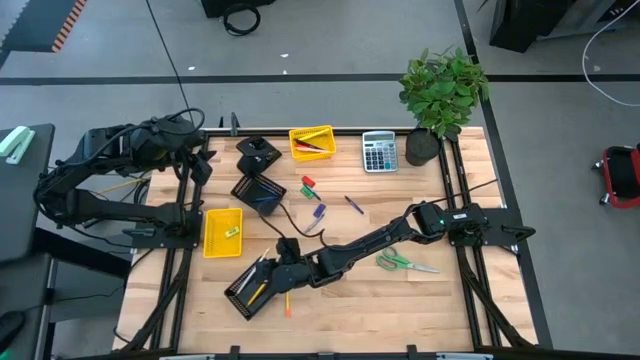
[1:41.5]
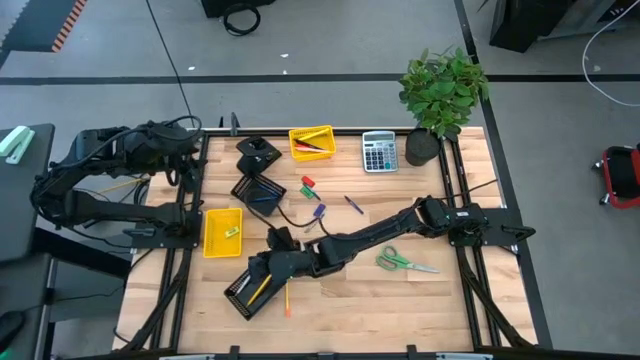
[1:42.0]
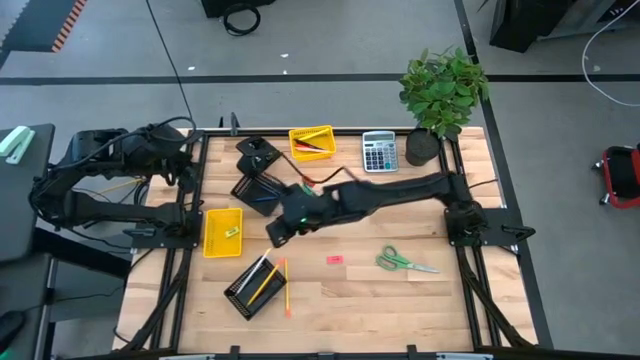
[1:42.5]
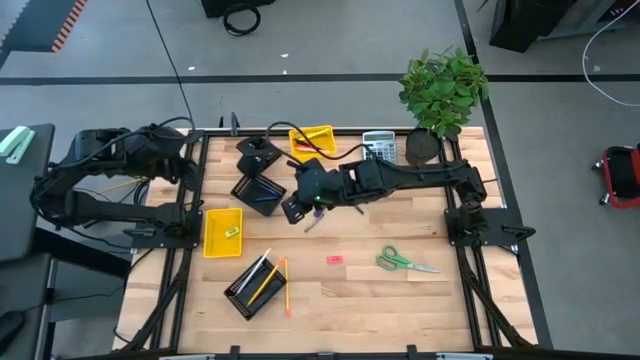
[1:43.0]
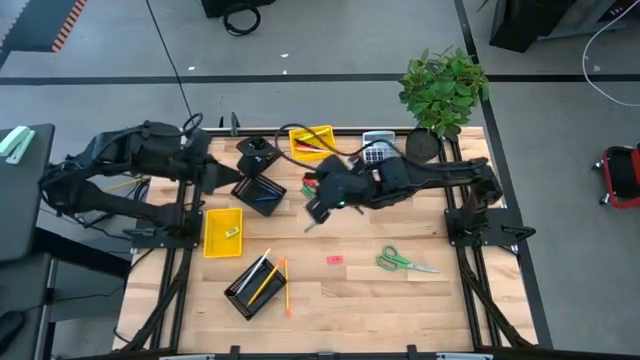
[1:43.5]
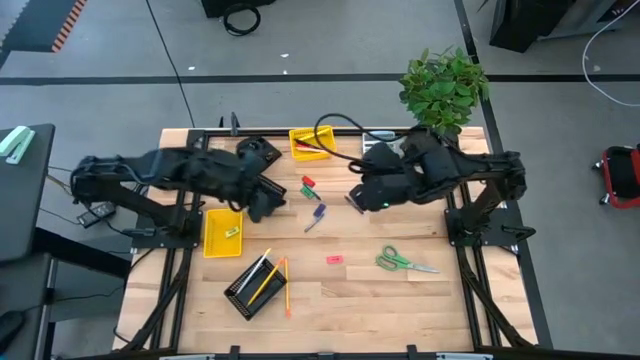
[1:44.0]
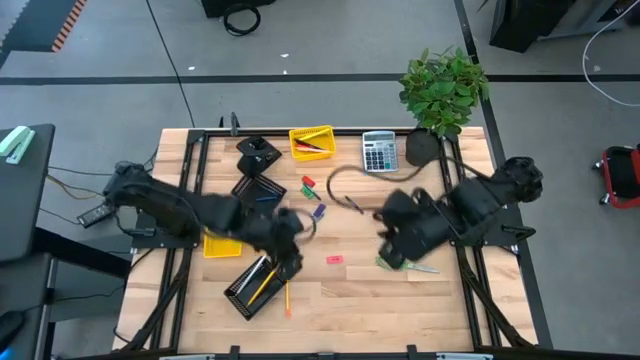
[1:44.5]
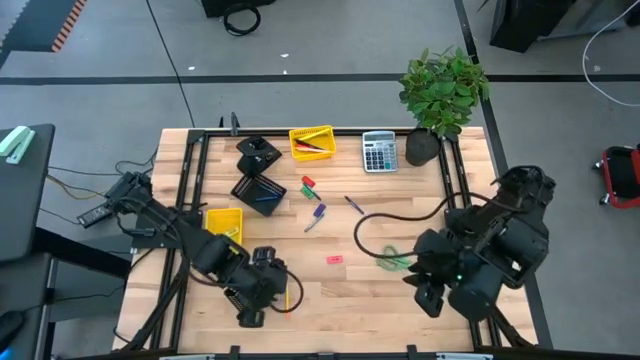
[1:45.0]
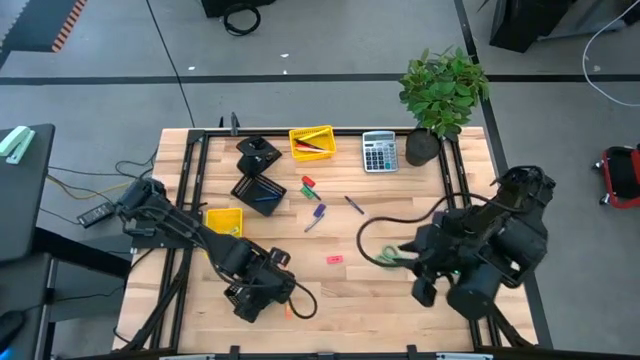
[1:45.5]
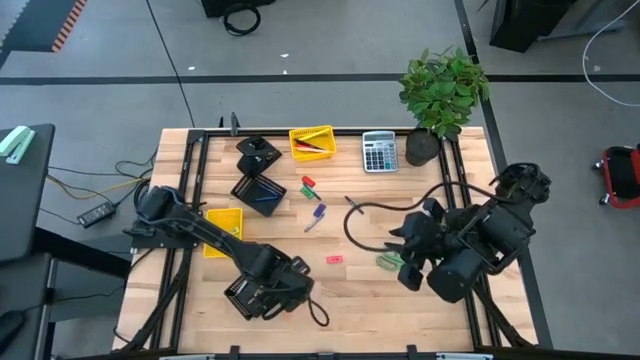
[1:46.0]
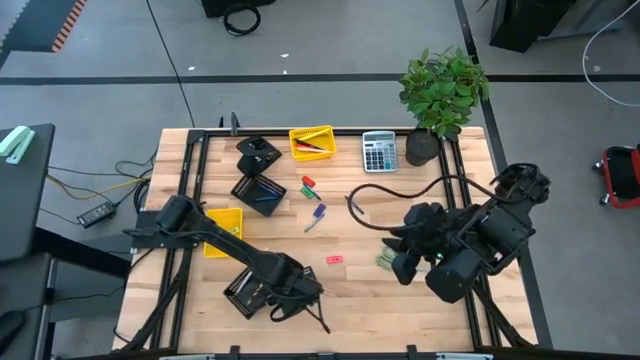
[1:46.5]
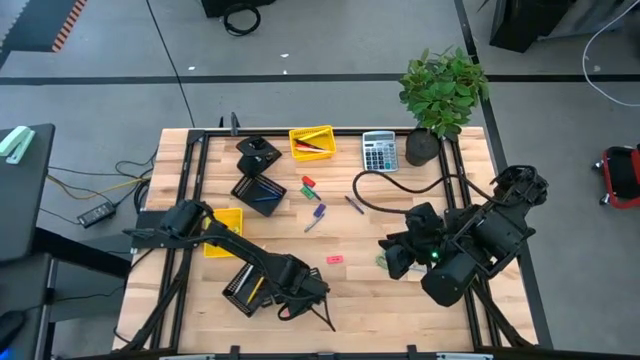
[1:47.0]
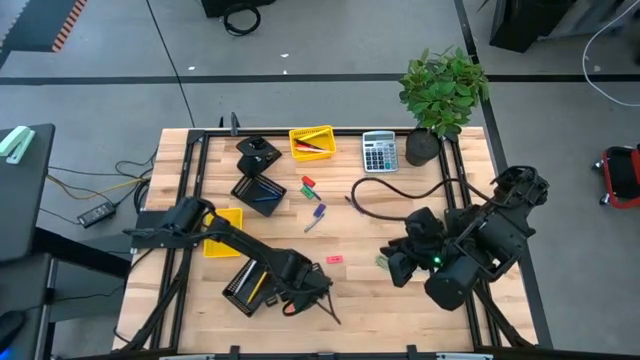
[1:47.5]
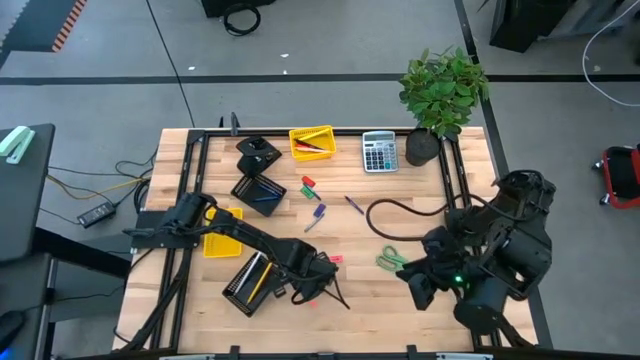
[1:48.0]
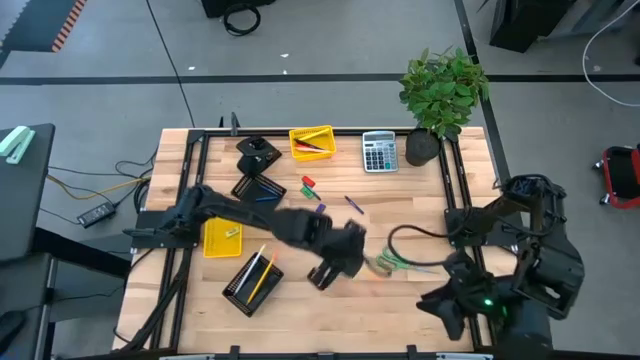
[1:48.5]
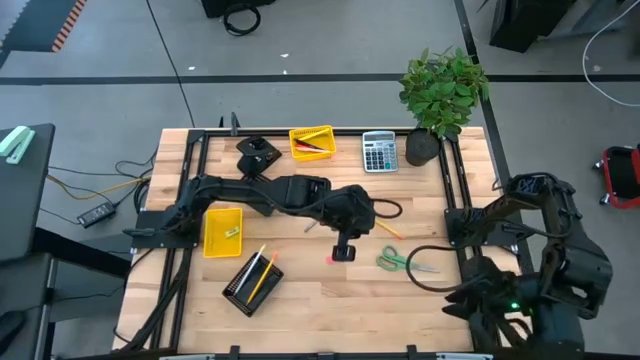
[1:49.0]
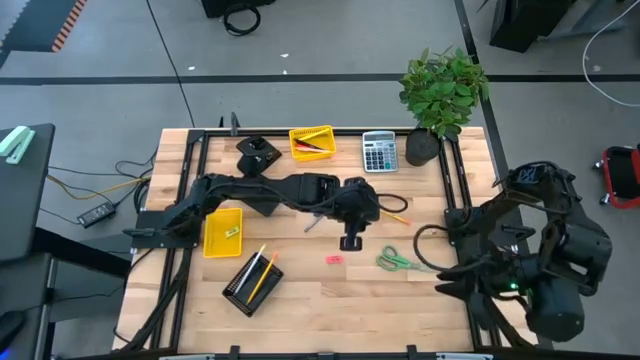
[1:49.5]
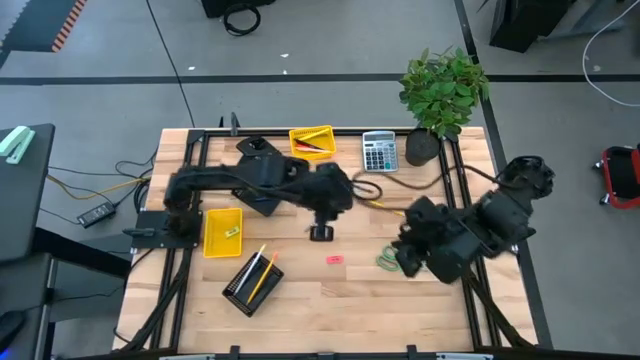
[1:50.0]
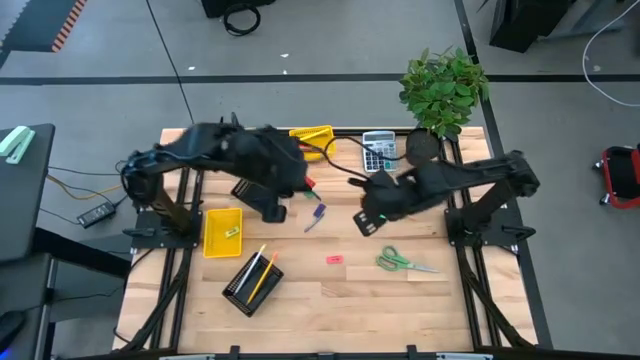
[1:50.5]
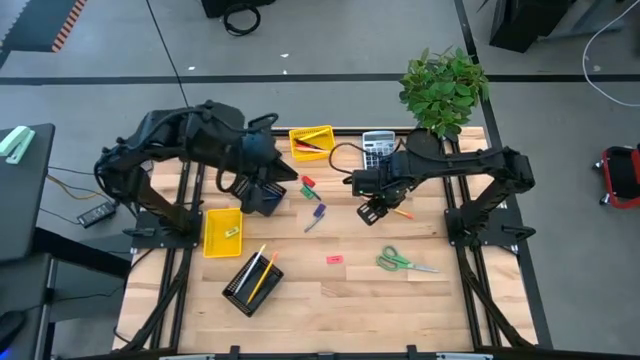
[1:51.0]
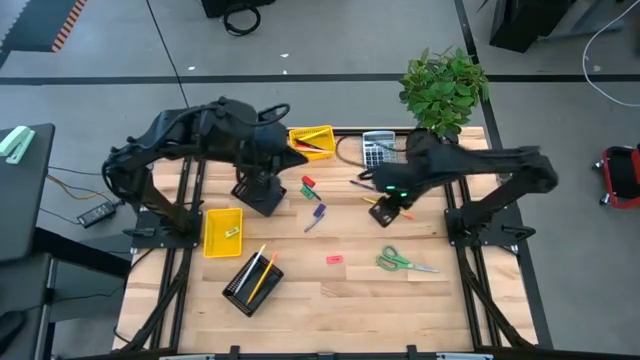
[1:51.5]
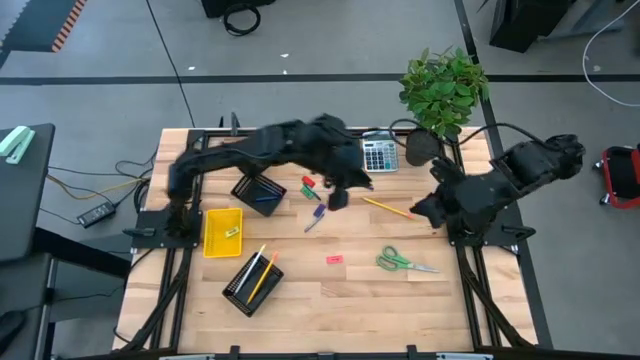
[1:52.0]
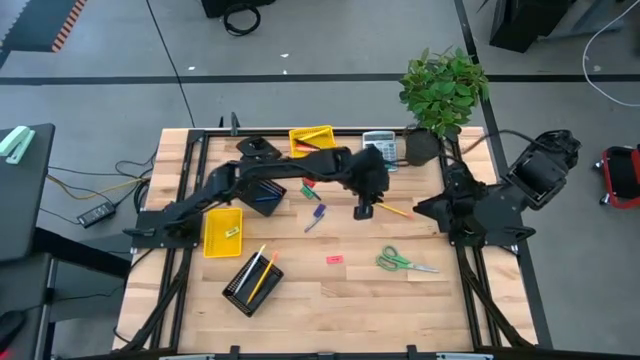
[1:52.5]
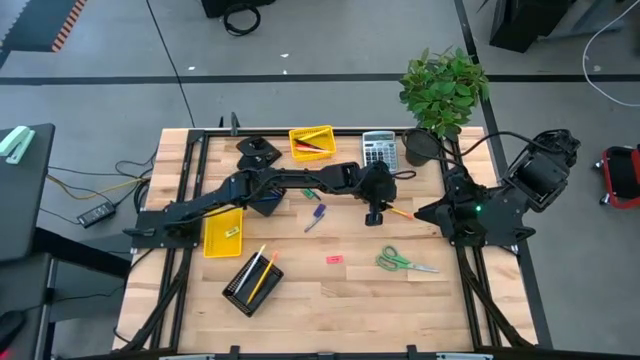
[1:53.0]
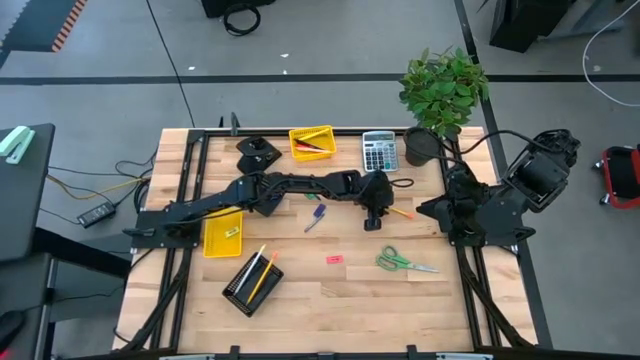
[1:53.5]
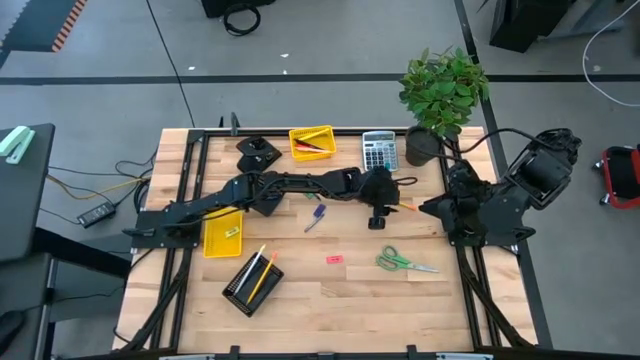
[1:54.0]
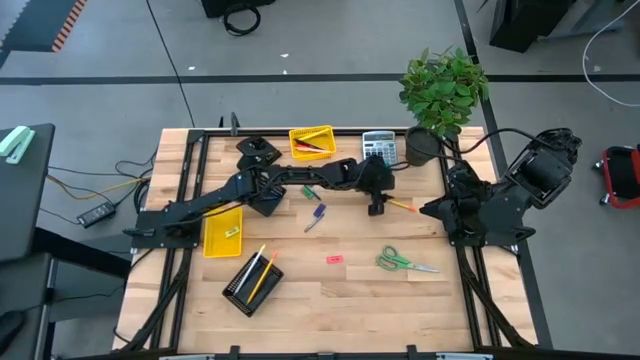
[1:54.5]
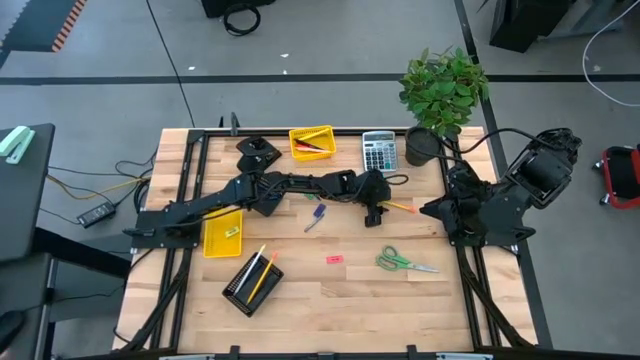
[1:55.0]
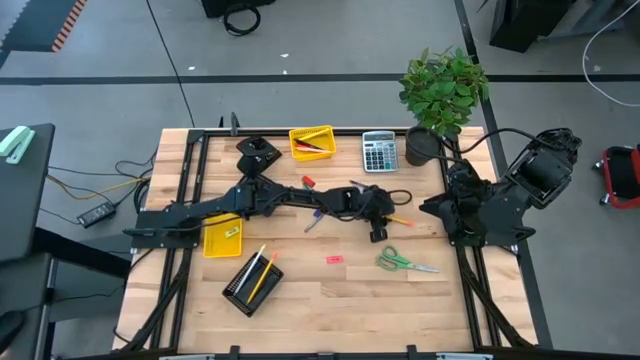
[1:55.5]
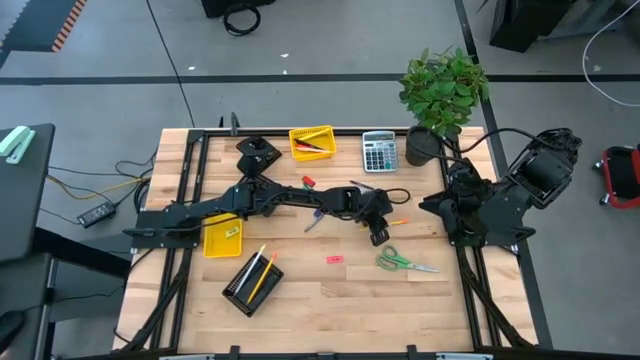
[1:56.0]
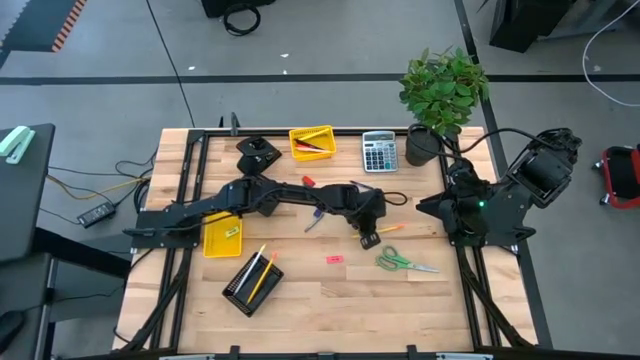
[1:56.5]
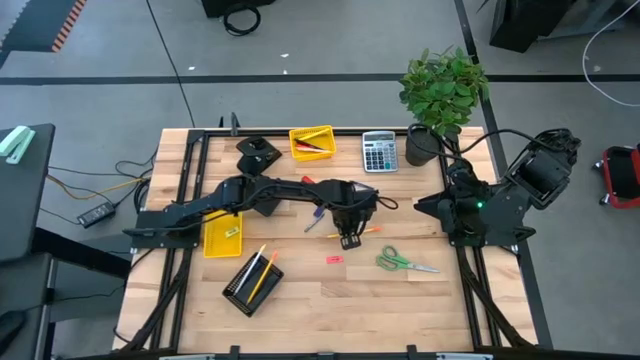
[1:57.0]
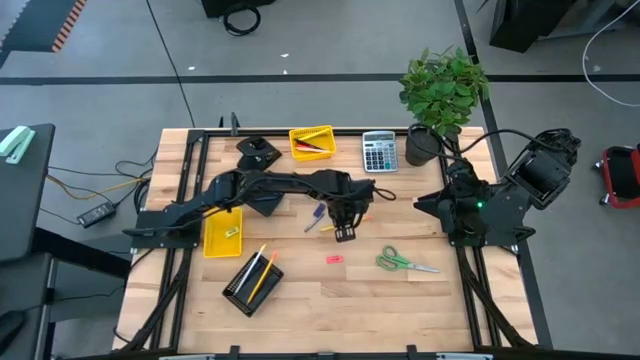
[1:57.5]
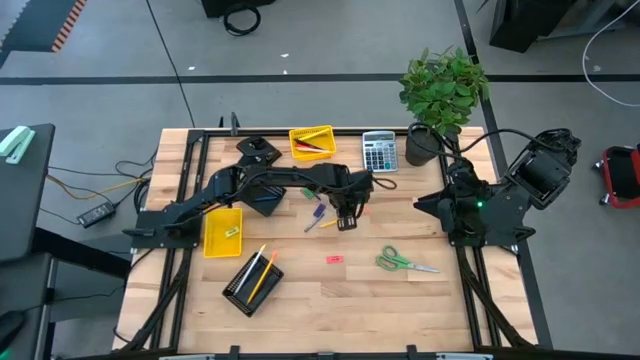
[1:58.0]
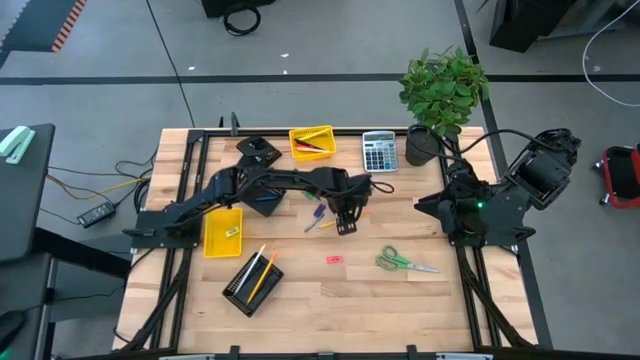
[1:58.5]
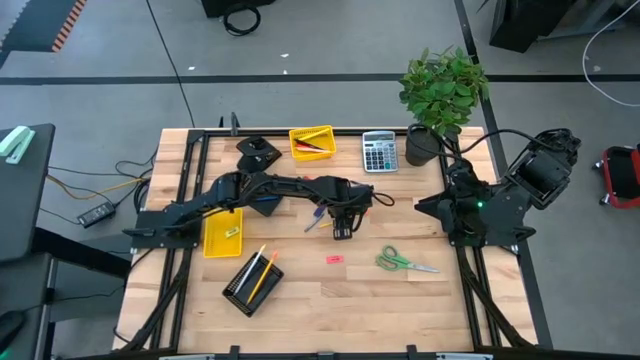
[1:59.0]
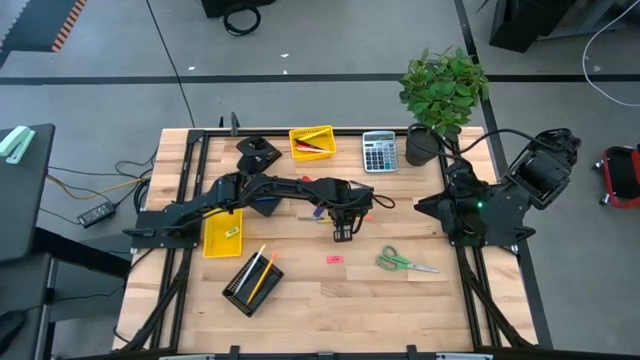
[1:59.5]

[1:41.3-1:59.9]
Task: Sort crayons/erasers/pens/pencils in bins
Put the yellow pencil into the bottom black basket

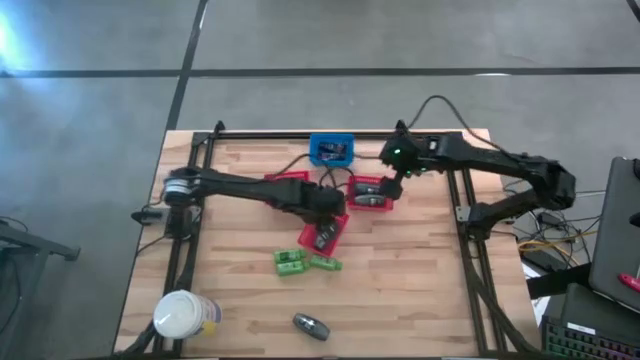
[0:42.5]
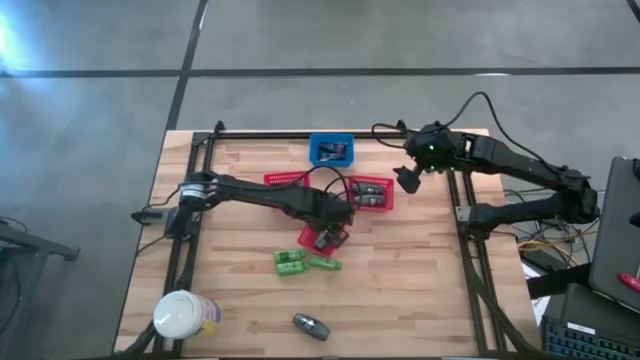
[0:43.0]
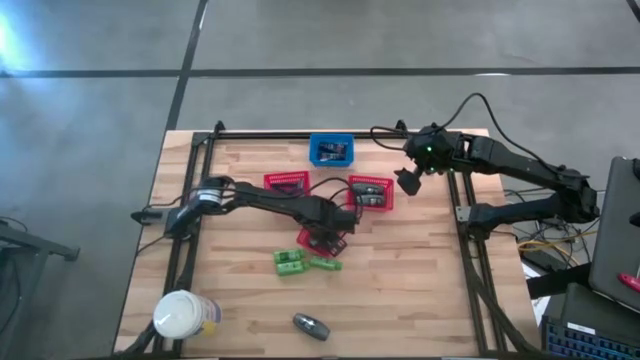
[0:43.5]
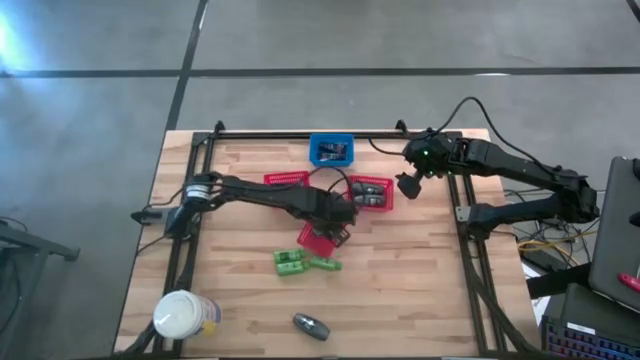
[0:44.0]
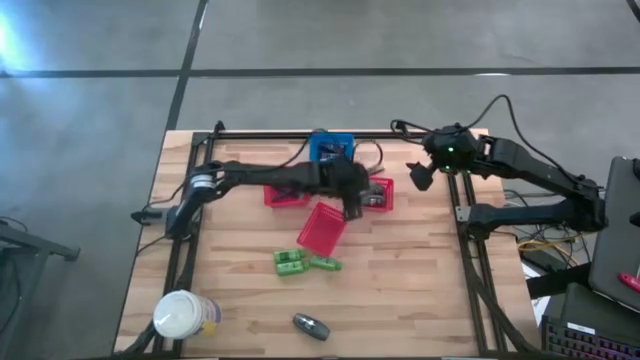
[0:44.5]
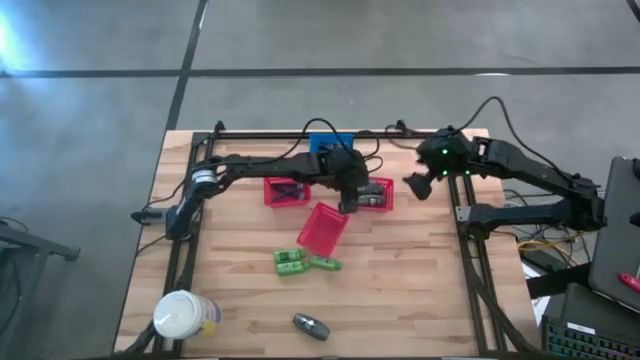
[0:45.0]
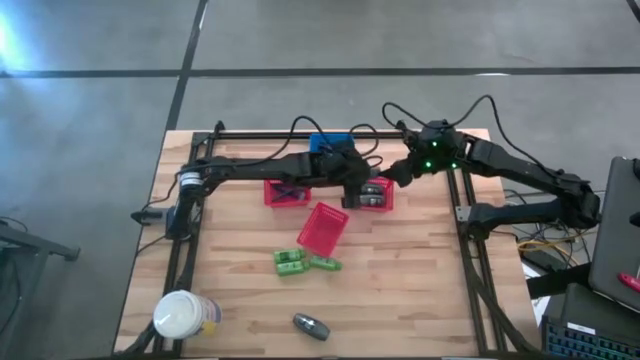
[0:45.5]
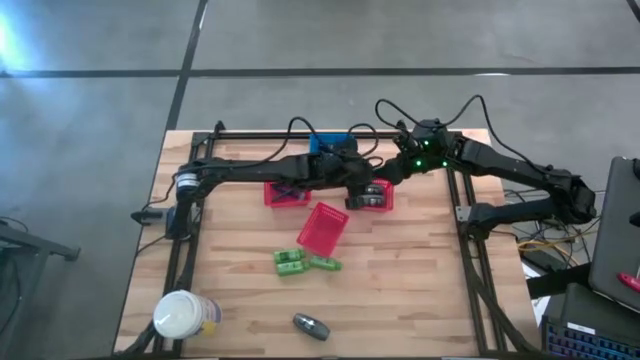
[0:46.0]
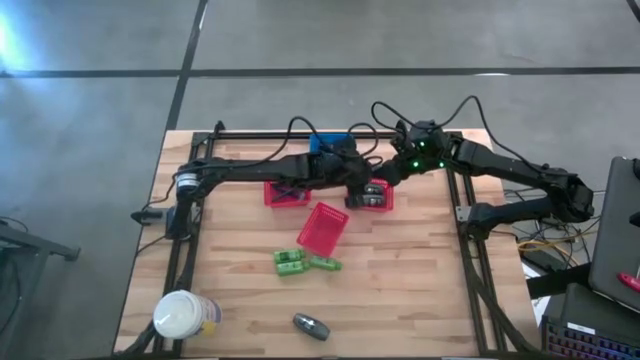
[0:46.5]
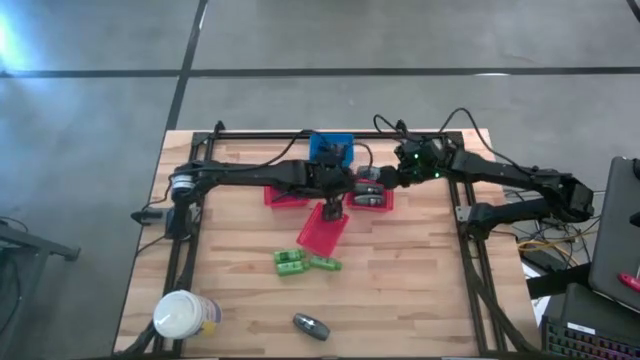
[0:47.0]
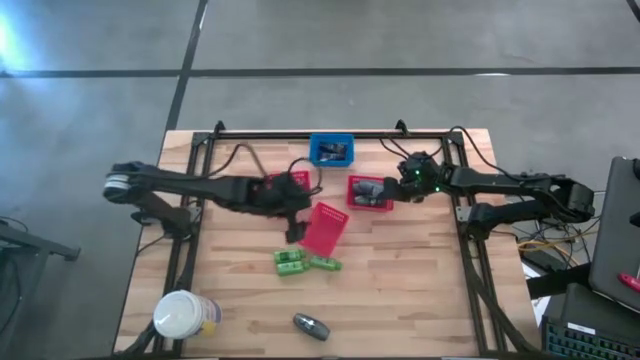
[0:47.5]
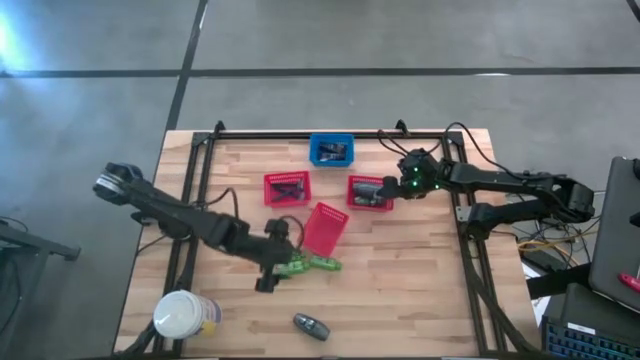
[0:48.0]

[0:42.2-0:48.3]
Task: Pick & Place Travel size toiletries
Put the black deodorant into the top right red bin
